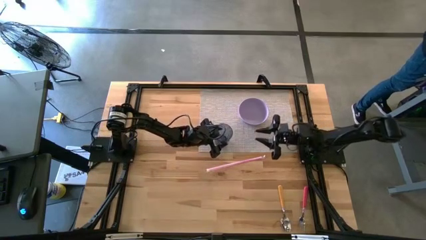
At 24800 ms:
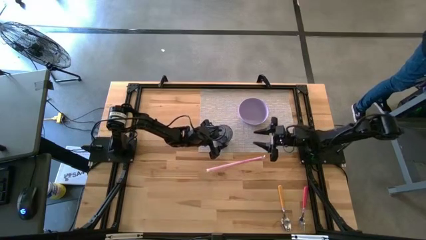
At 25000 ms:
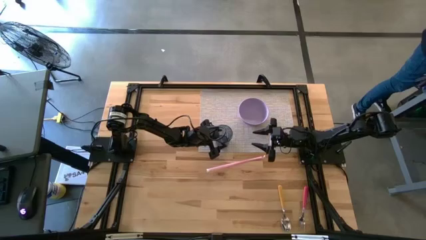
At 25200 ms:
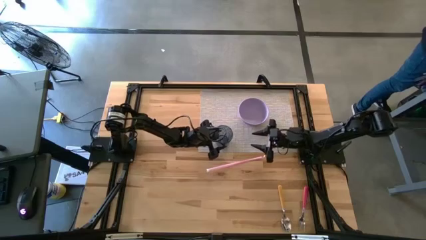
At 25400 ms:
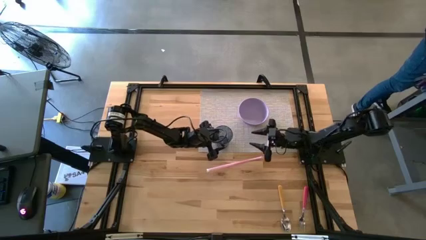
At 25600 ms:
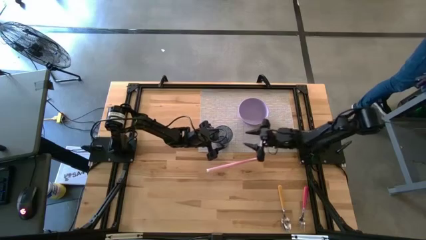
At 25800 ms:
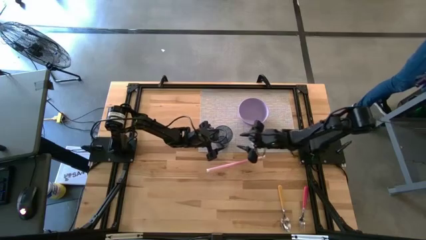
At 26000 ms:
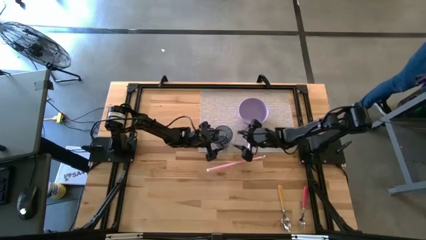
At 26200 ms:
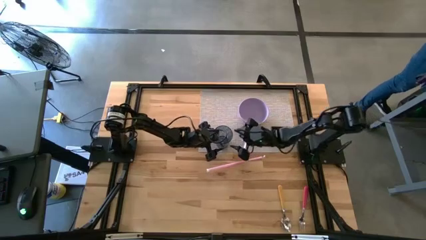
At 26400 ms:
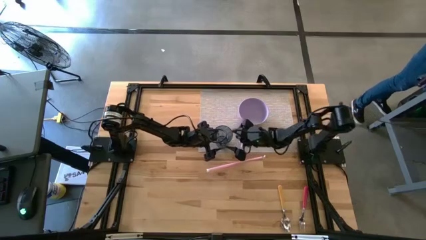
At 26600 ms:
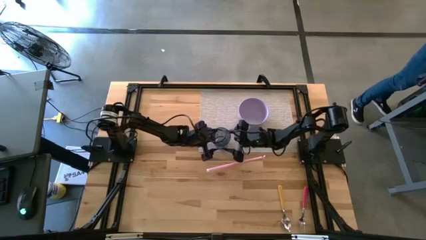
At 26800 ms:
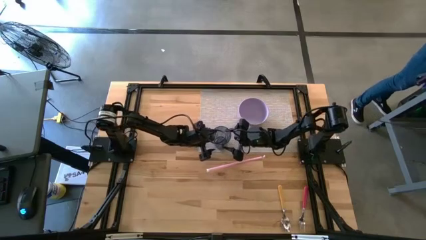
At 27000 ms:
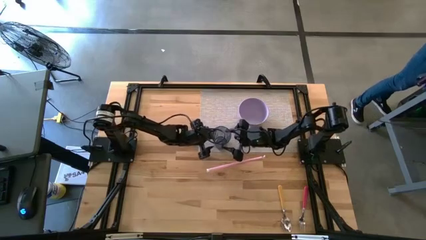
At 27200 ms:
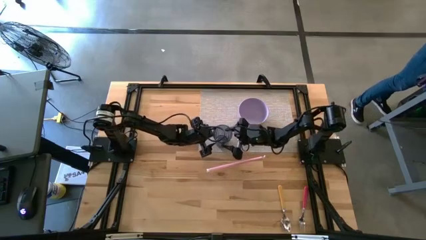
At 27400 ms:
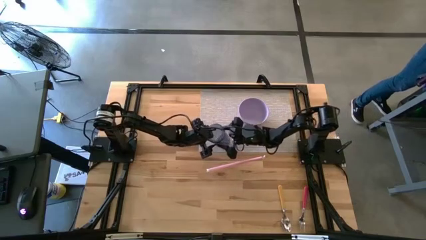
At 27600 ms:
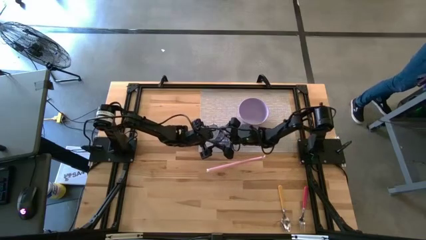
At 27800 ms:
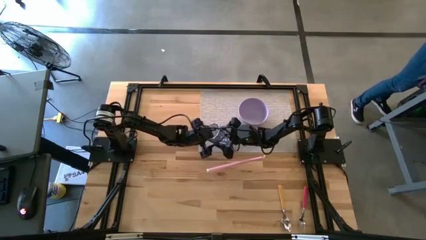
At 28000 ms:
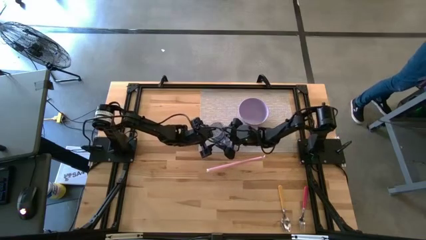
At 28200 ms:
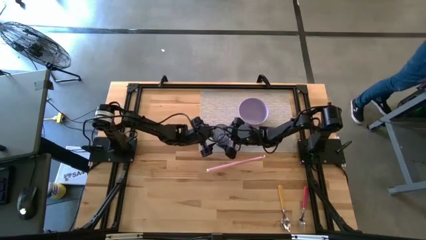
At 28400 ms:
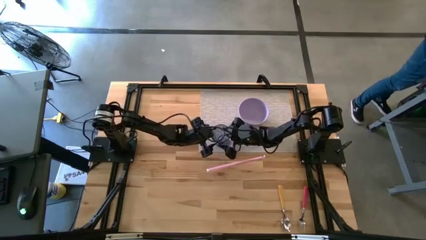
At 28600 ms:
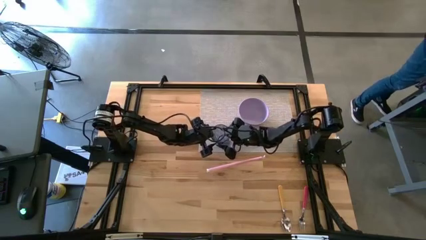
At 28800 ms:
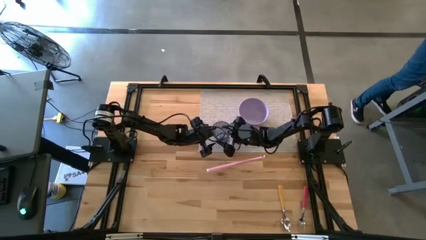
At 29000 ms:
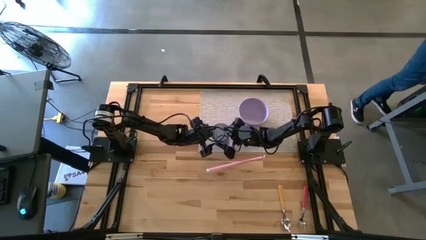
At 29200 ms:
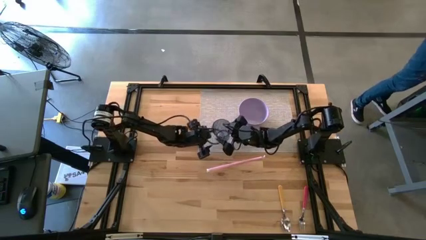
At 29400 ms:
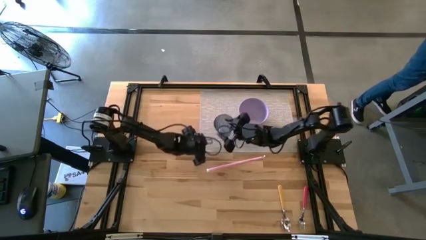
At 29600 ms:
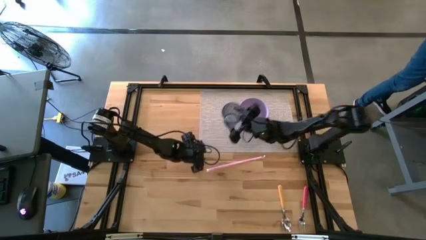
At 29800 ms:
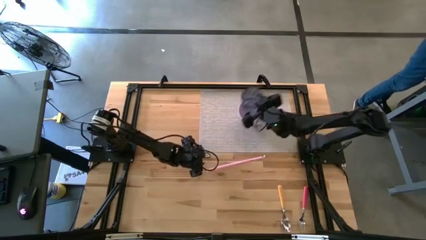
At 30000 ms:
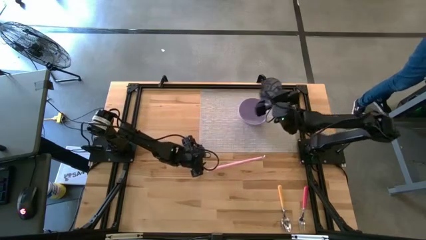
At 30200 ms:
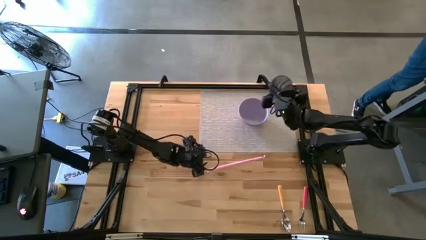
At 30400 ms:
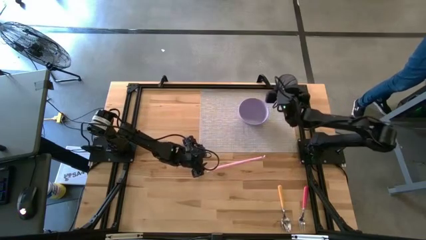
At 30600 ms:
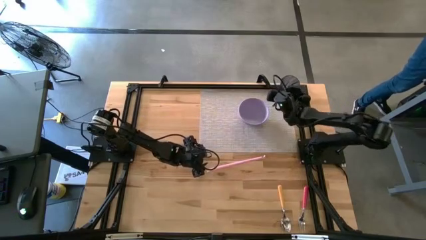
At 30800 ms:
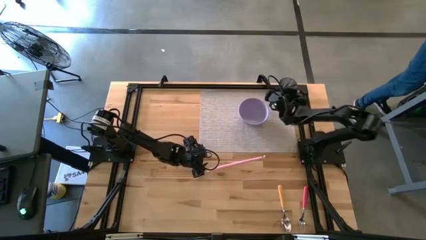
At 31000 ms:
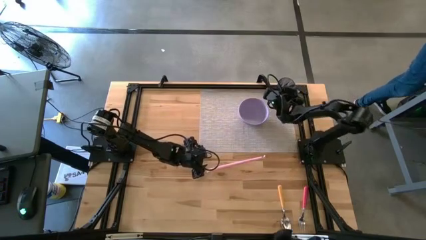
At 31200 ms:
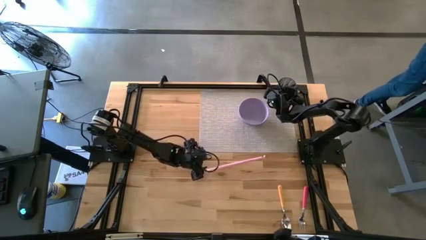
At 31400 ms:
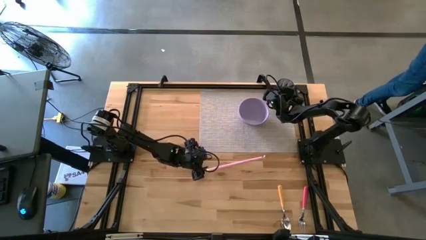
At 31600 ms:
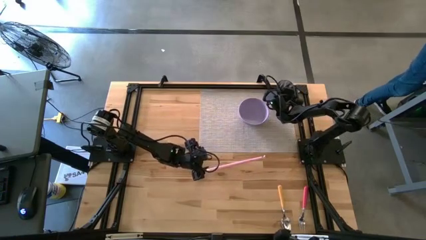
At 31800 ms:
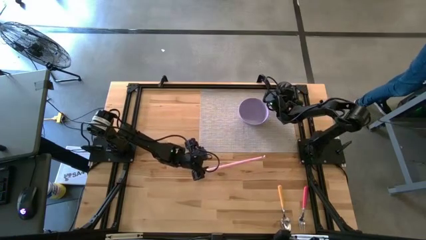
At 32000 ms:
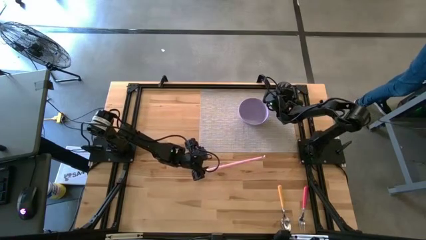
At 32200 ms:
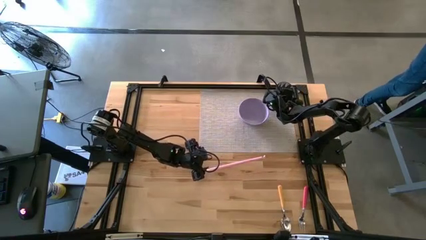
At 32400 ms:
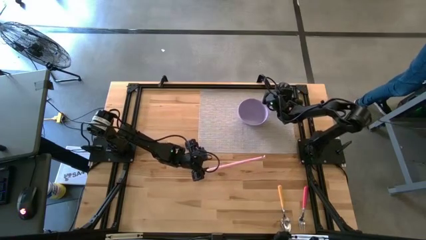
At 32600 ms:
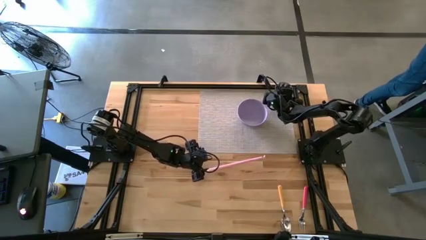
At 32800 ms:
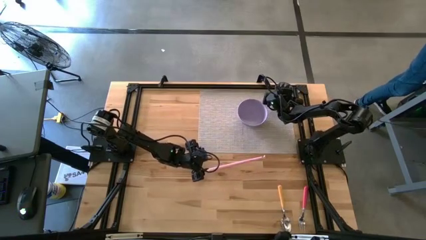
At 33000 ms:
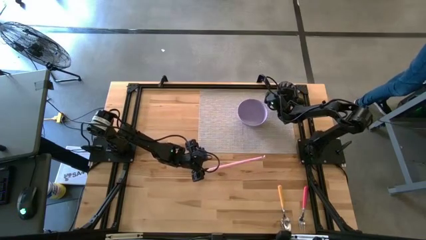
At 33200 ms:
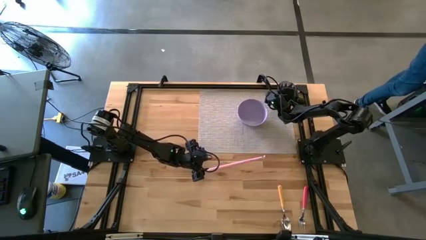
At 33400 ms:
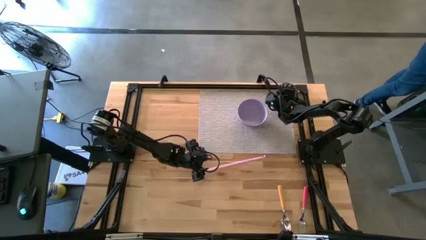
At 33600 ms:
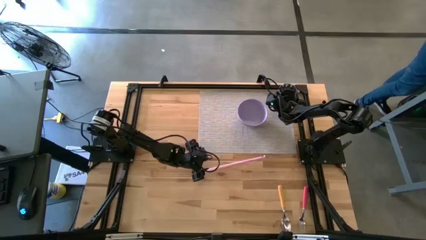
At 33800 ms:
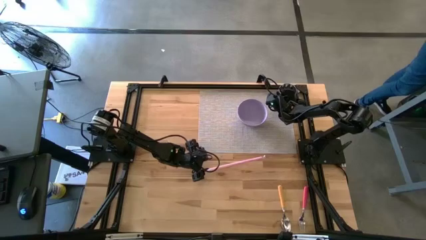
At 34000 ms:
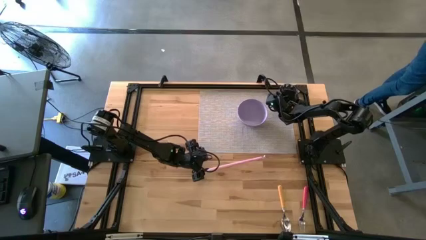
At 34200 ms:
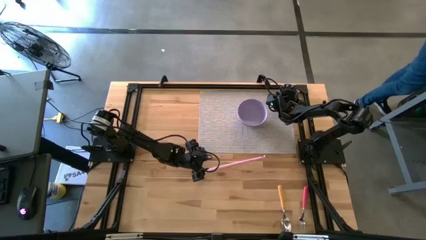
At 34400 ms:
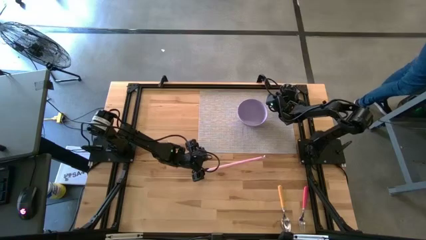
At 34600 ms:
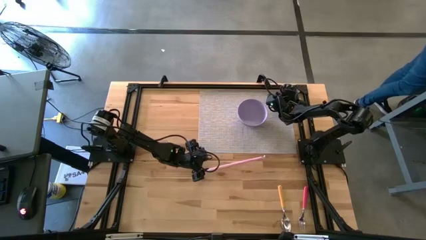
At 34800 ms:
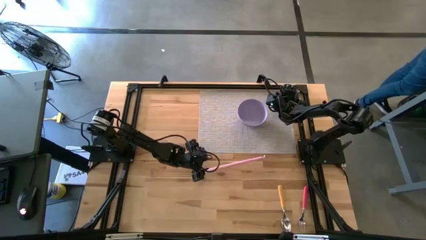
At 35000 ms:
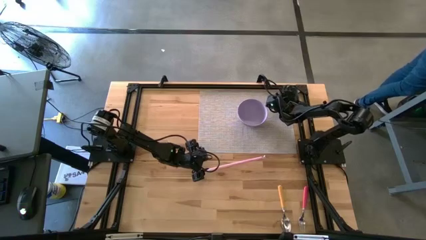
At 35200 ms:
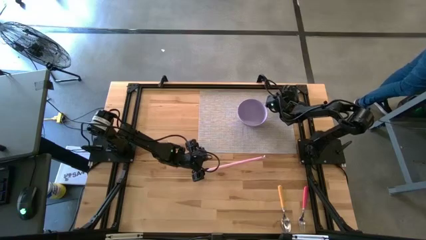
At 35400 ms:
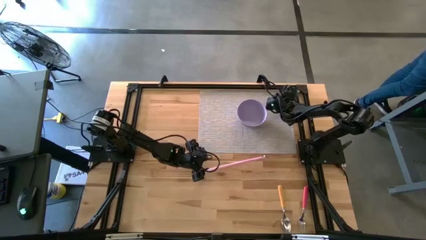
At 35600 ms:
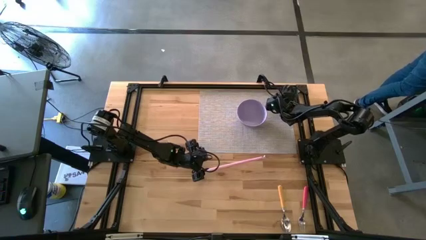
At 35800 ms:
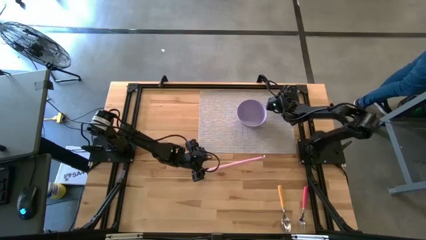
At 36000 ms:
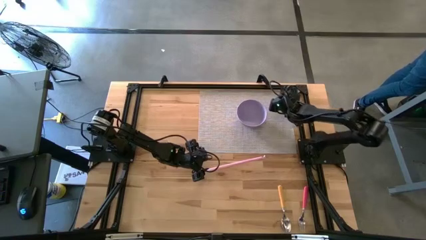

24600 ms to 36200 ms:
Task: Pick & Place Utensil
Put the blue cup on the gray mat to the top right of the violet bowl

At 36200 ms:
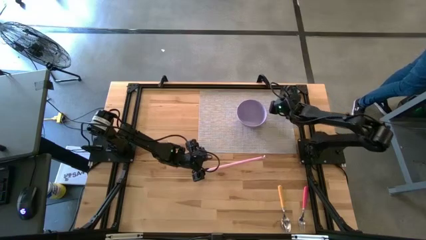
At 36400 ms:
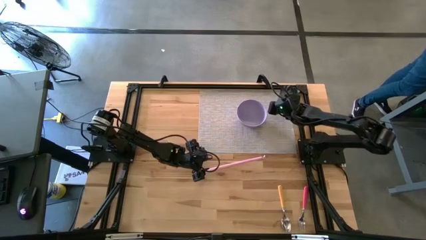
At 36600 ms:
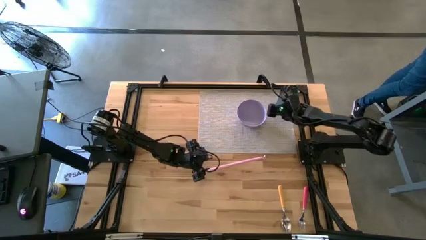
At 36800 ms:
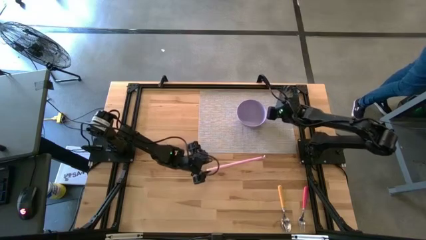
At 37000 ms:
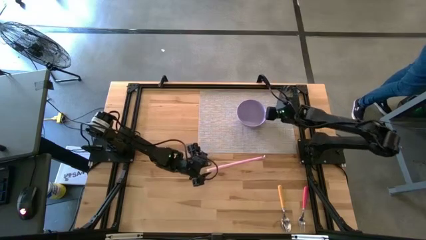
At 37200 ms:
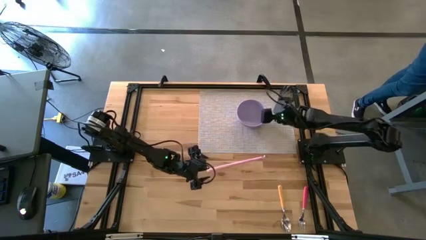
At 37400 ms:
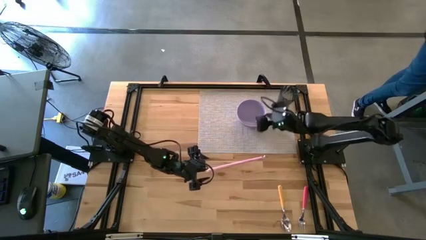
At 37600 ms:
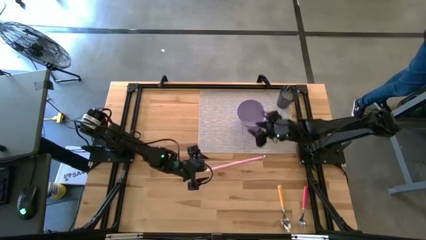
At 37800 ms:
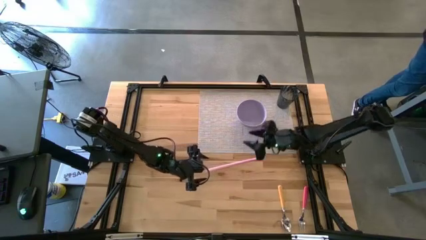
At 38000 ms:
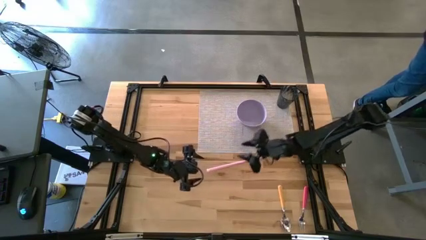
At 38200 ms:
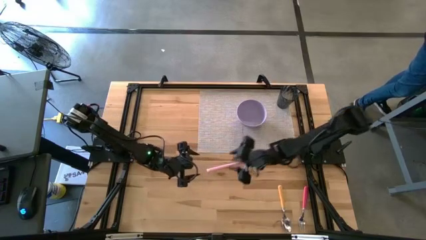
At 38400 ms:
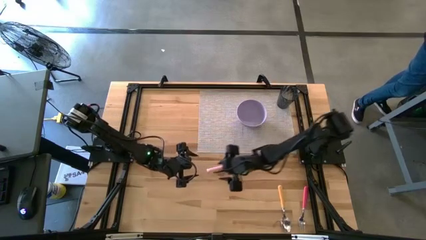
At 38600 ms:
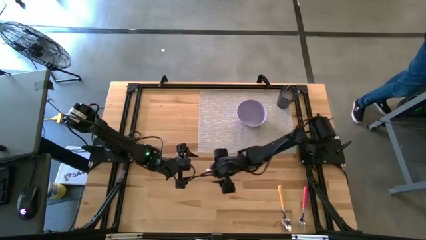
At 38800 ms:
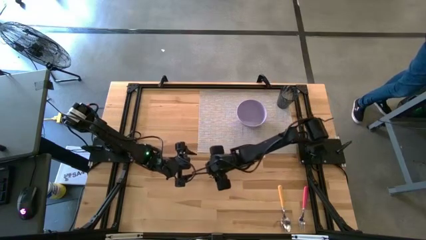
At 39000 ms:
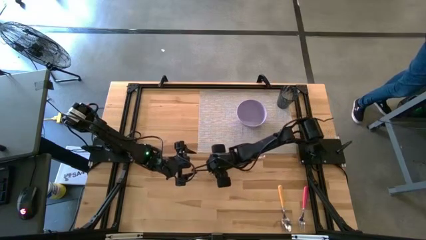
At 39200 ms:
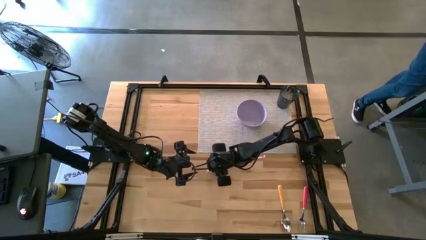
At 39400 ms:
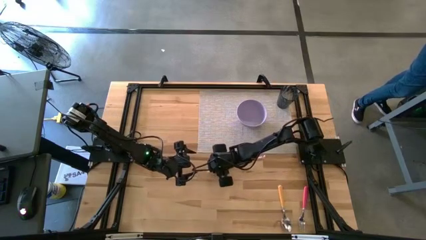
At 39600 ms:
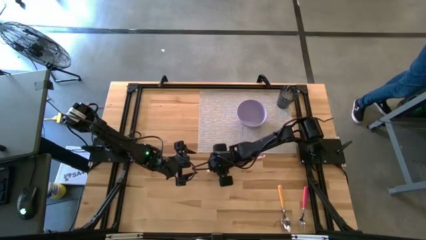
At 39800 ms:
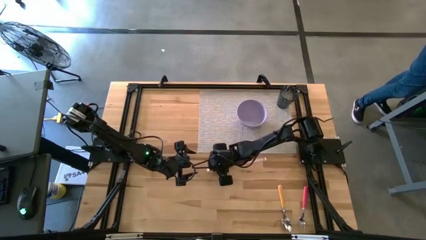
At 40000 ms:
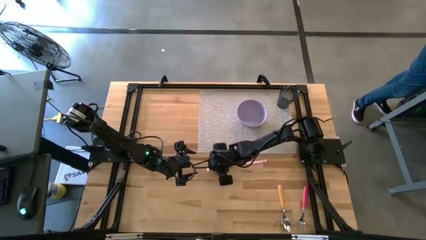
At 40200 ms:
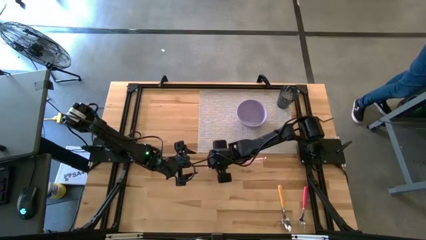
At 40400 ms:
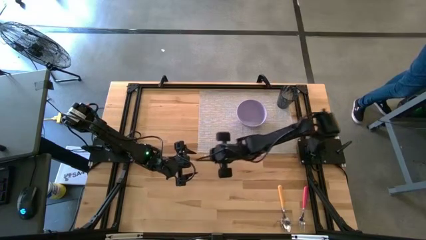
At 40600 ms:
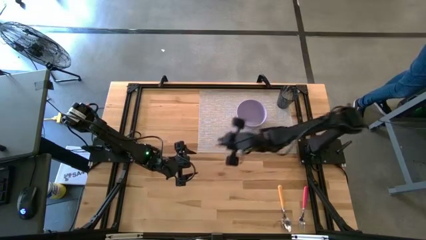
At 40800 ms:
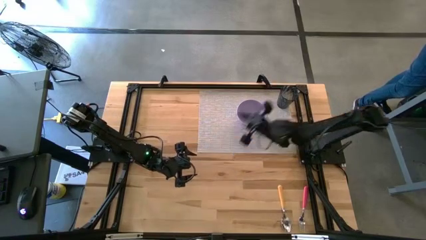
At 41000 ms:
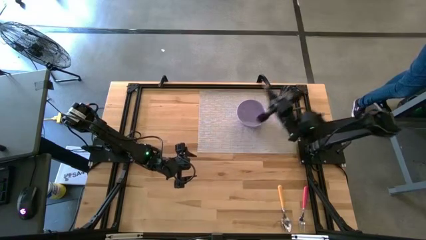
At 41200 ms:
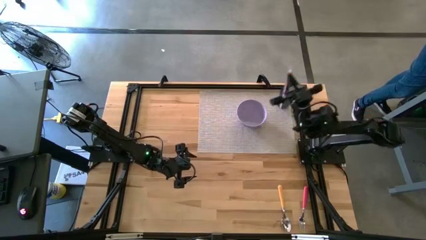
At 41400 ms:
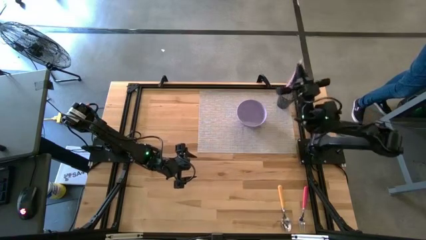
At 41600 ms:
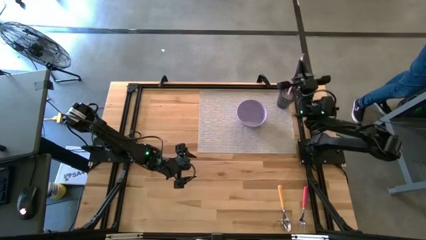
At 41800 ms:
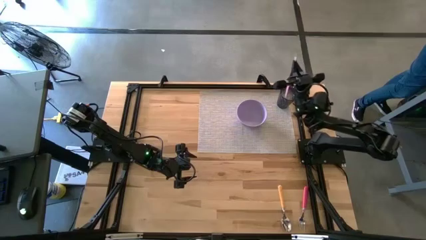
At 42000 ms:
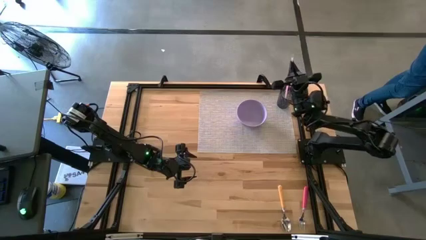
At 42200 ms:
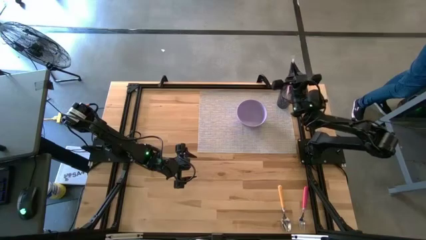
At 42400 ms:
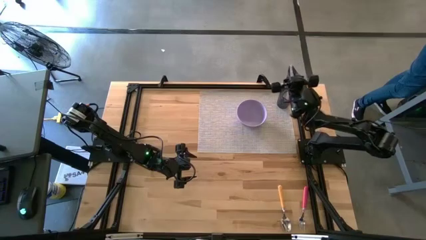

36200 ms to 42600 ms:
Put the pink straw into the blue cup
